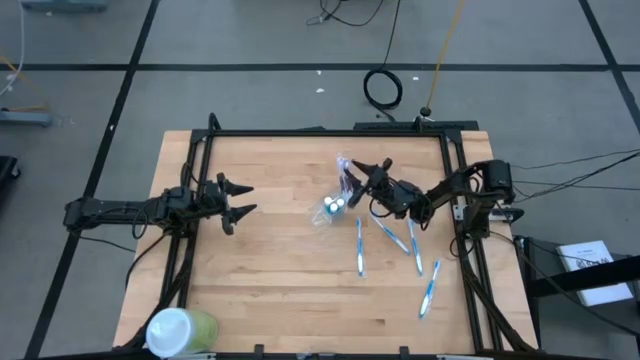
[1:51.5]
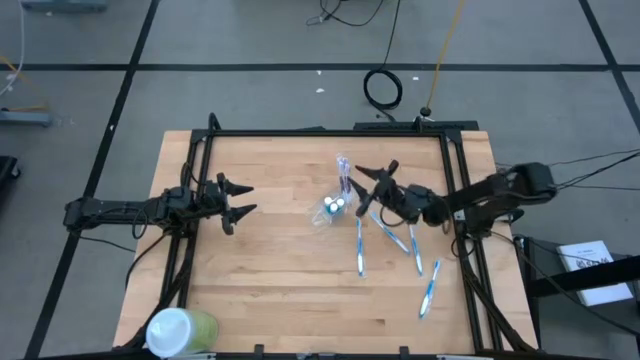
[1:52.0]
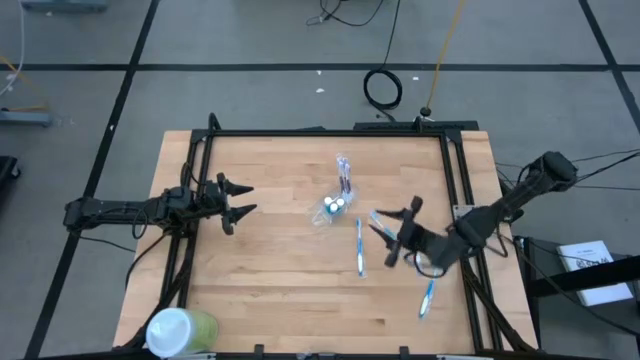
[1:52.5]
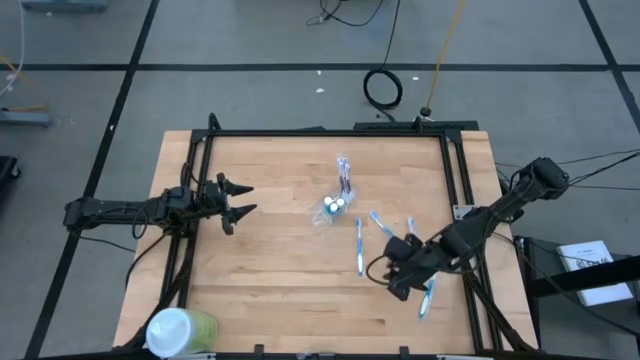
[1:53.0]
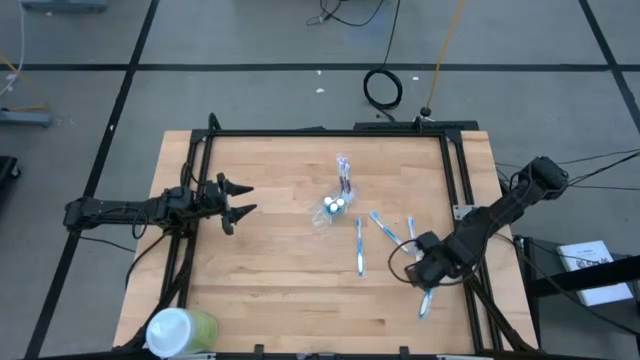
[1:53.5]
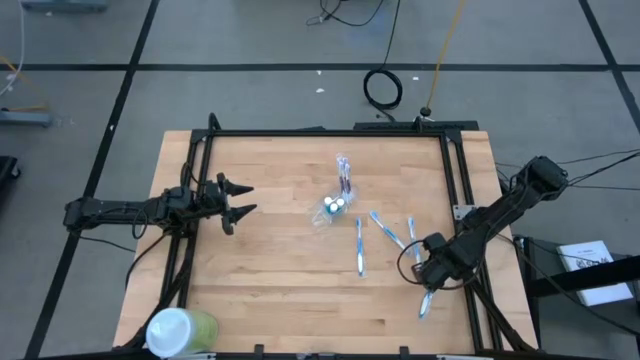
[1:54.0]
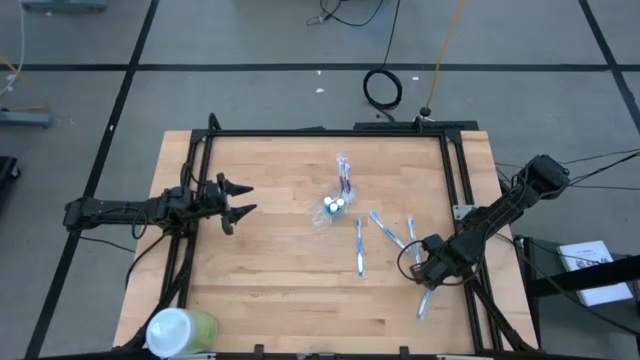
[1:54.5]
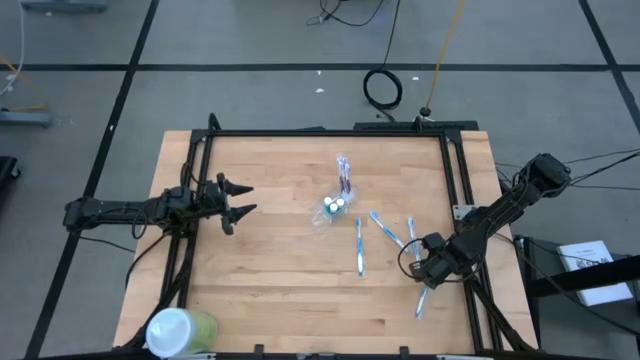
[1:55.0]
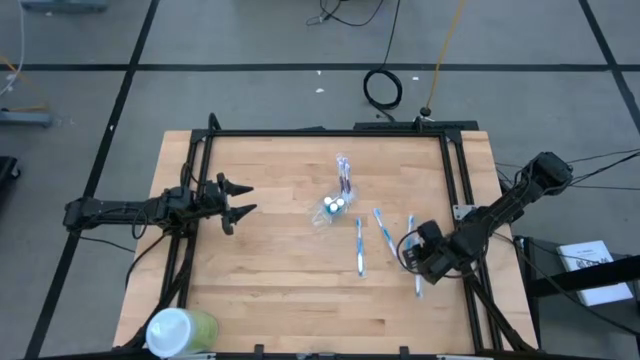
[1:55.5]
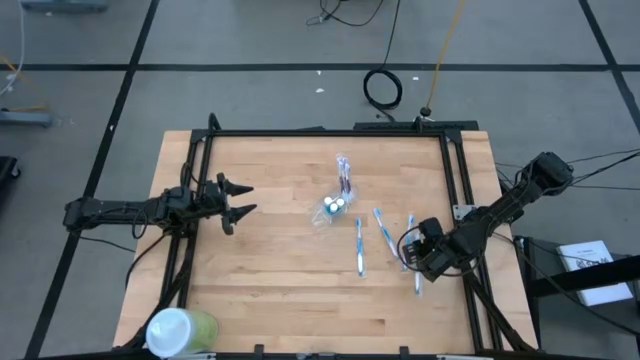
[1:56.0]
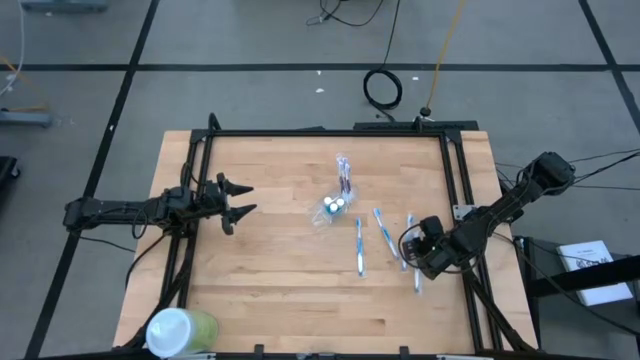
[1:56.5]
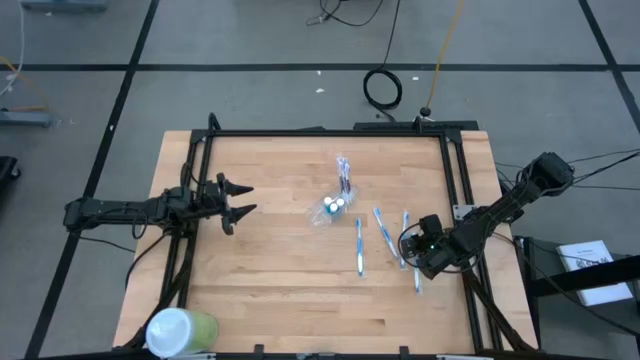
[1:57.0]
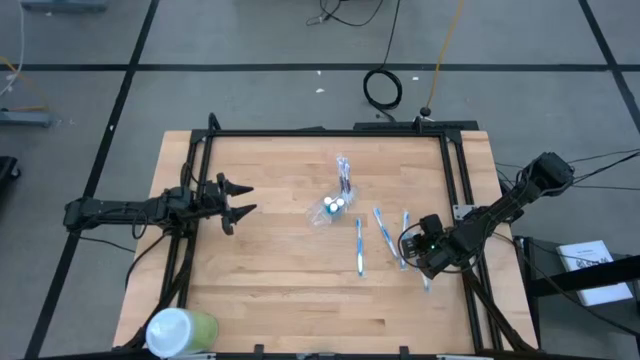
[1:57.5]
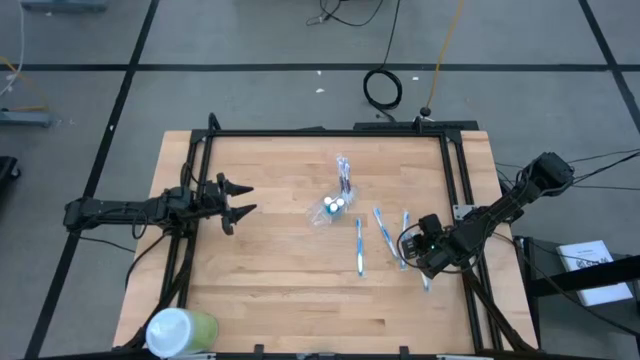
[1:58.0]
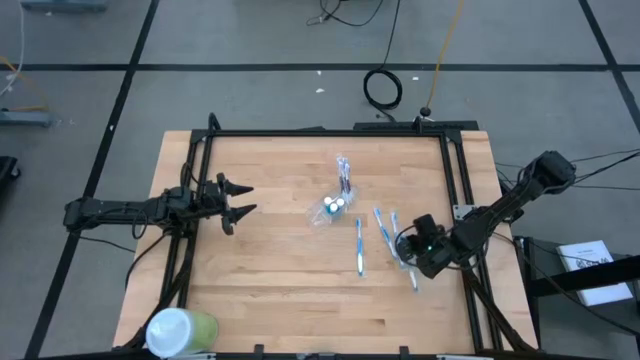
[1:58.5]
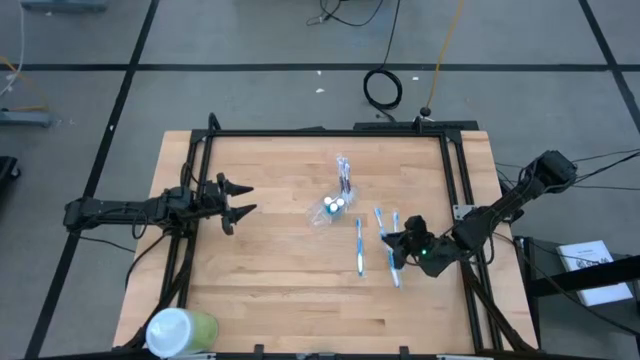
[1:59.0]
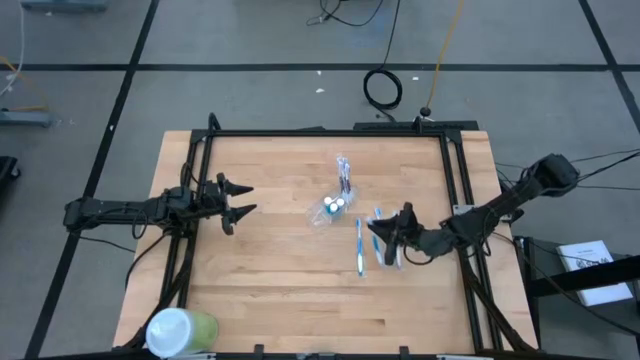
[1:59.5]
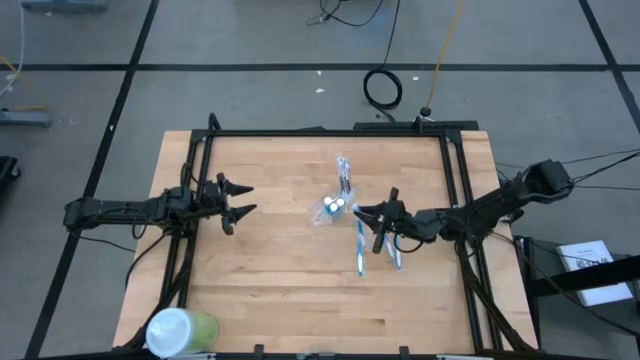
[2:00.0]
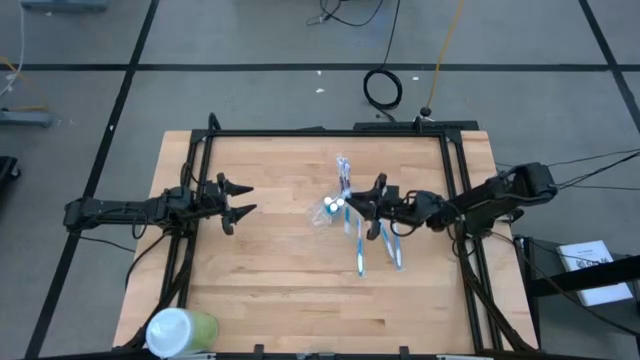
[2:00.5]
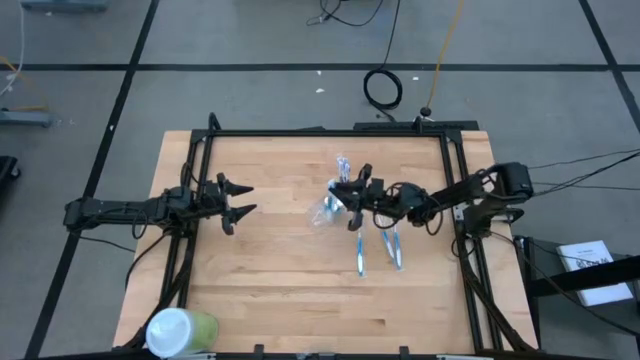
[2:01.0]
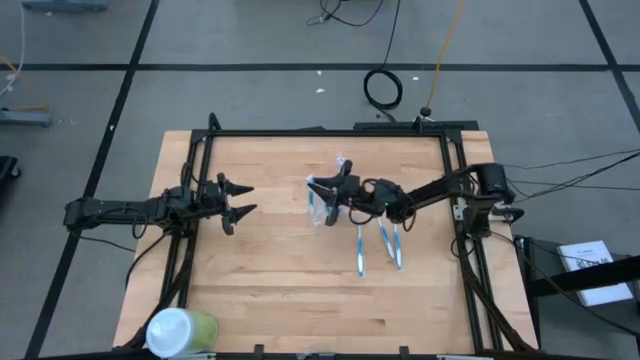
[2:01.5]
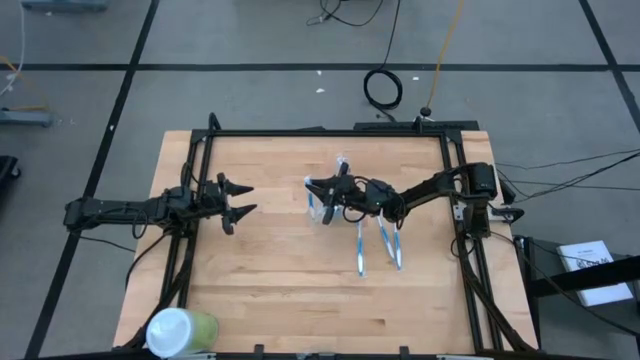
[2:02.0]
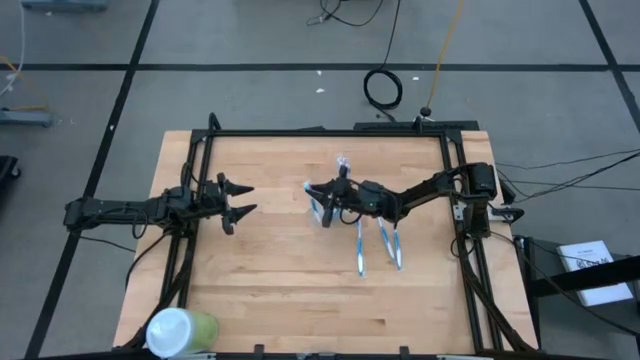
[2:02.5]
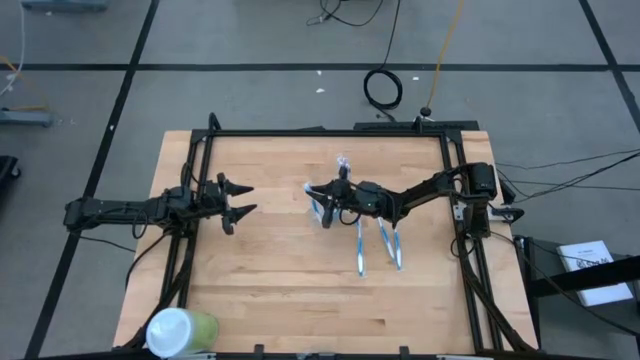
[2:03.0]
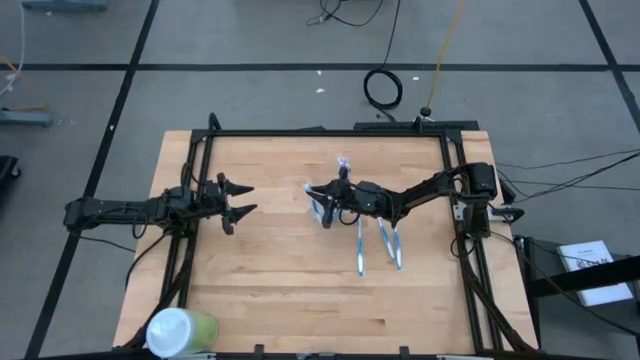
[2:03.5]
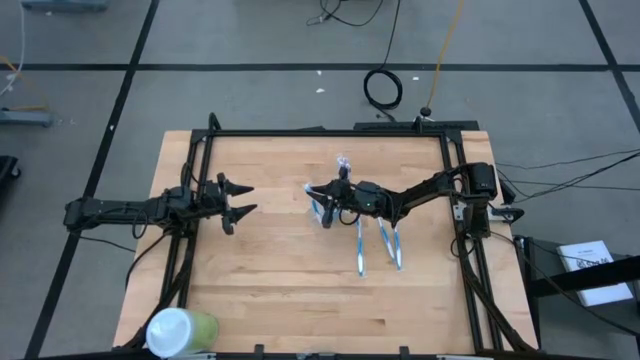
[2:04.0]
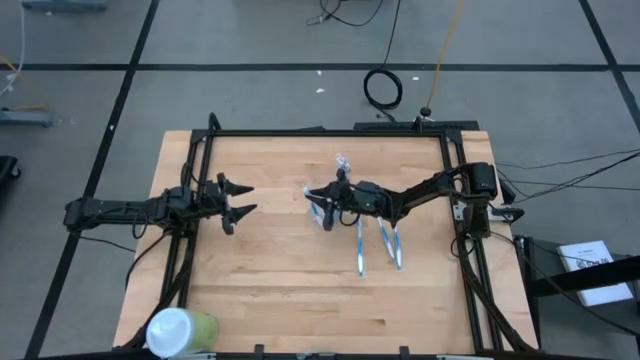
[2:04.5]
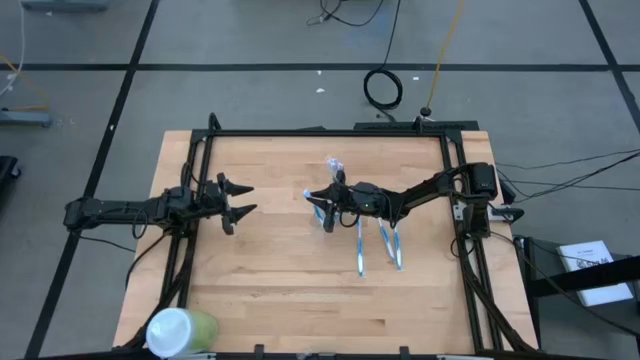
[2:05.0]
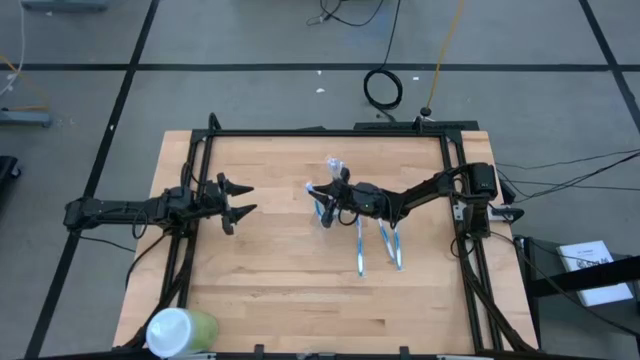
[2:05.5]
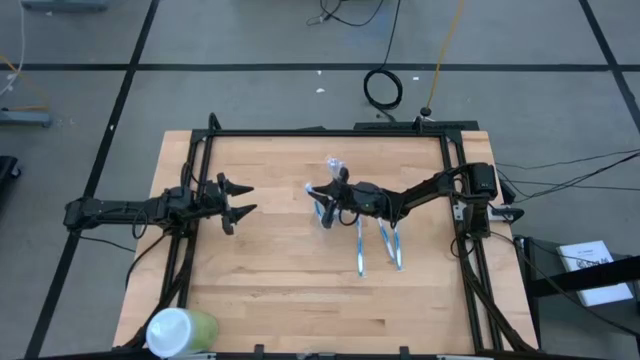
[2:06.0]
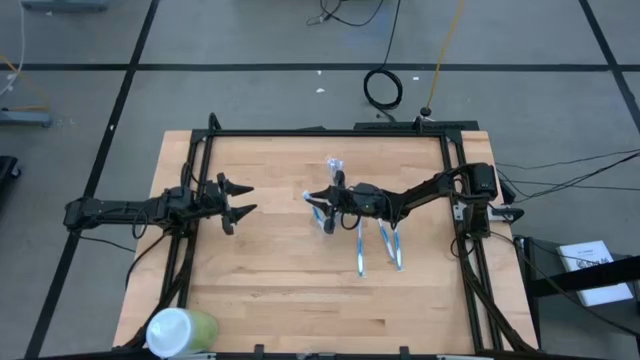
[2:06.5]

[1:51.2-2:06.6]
Task: Pick & Place toothbrushing station
Put the blue toothbrush into the transparent organizer

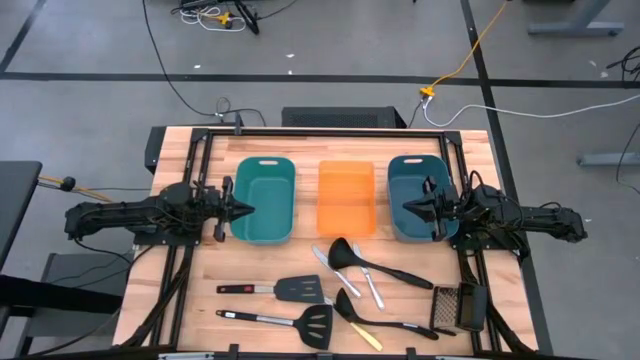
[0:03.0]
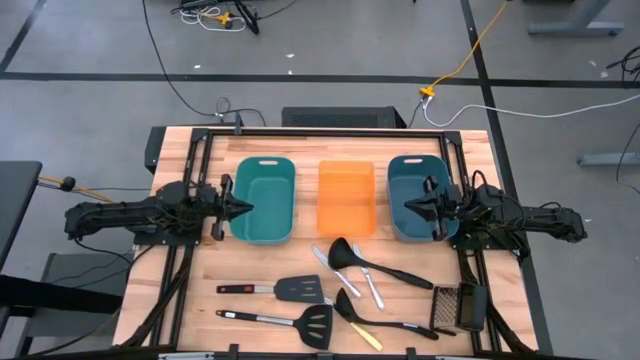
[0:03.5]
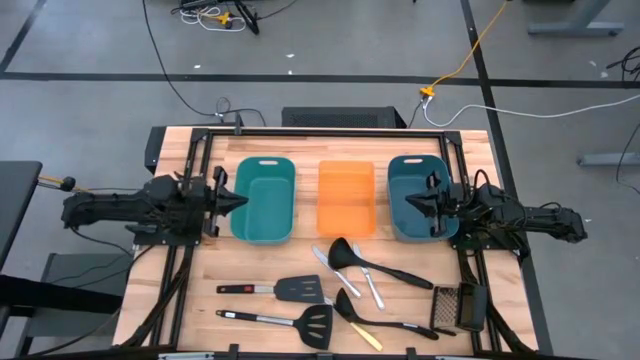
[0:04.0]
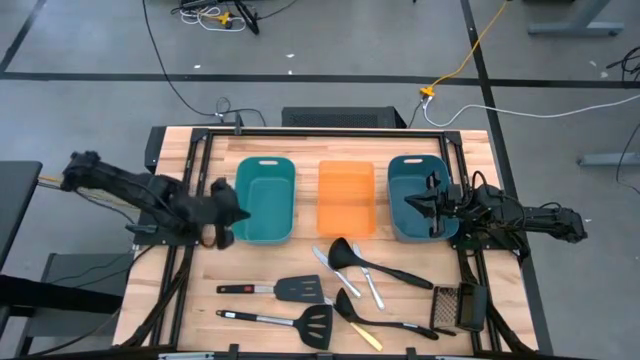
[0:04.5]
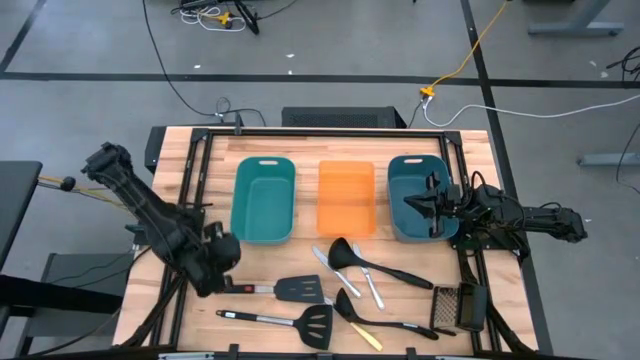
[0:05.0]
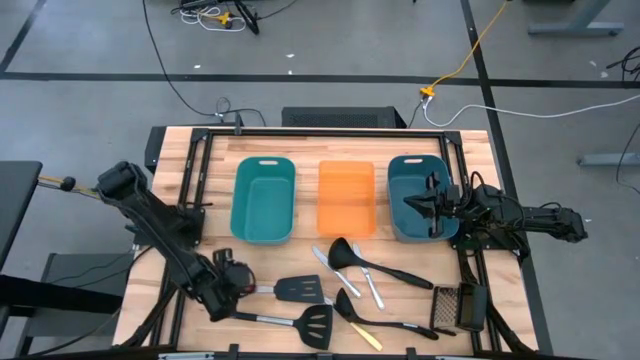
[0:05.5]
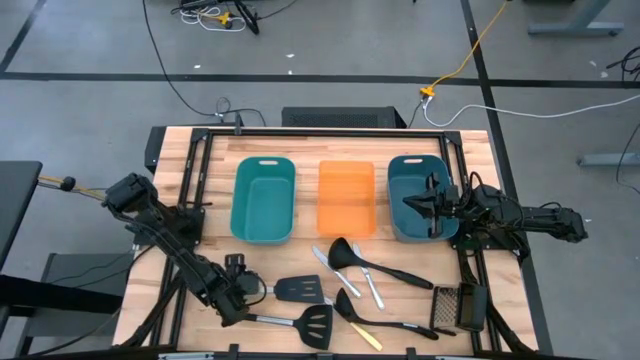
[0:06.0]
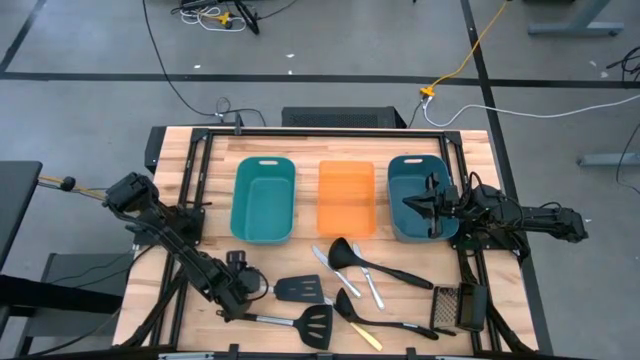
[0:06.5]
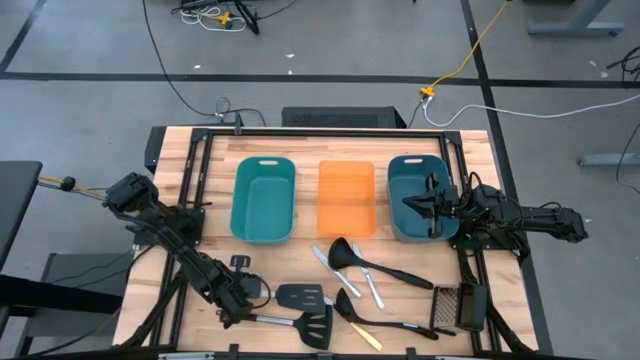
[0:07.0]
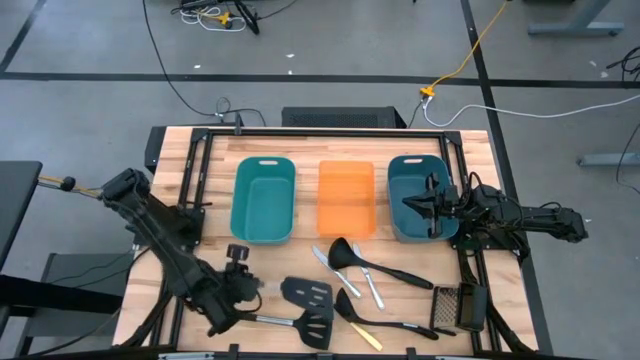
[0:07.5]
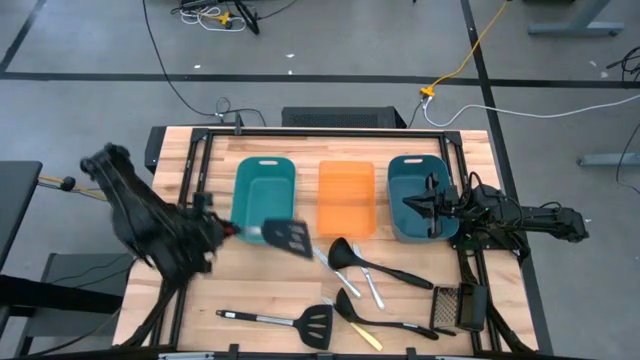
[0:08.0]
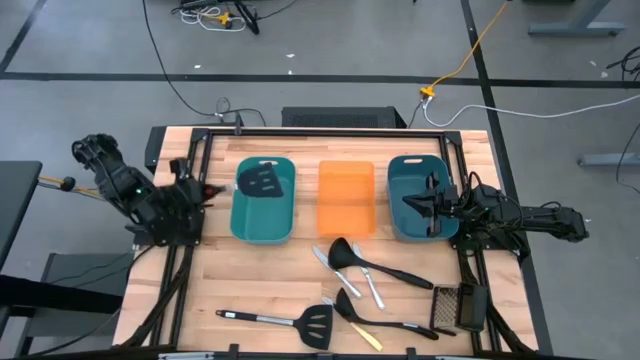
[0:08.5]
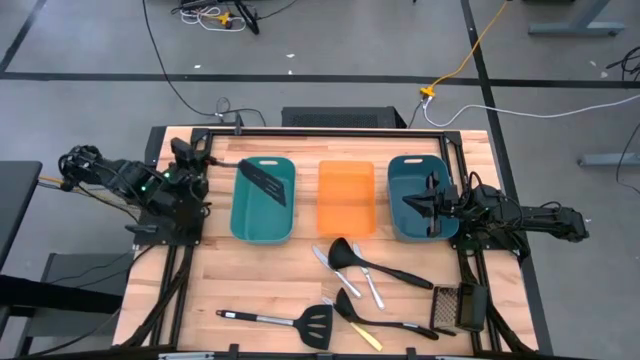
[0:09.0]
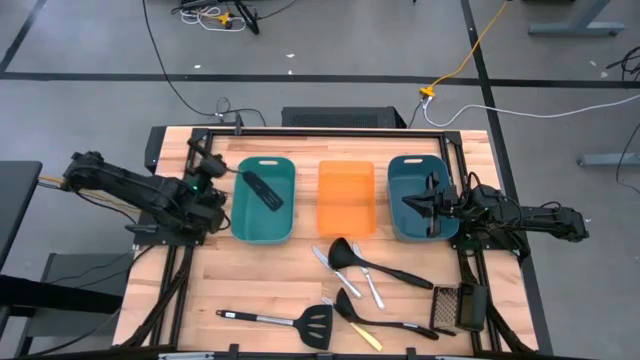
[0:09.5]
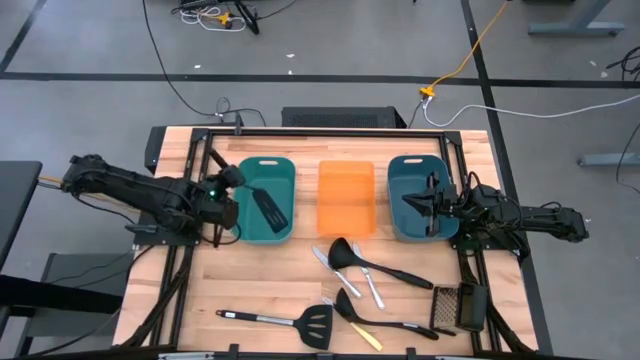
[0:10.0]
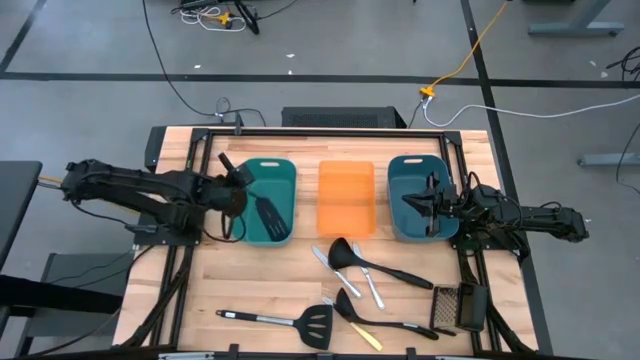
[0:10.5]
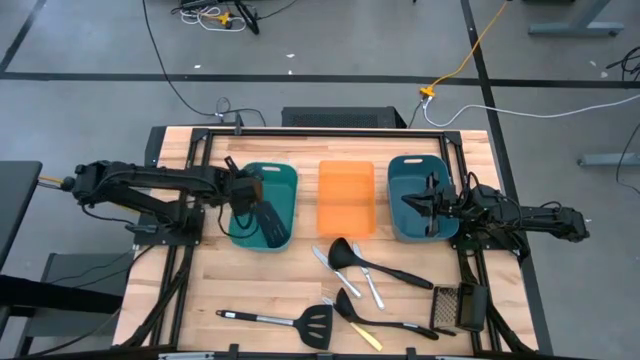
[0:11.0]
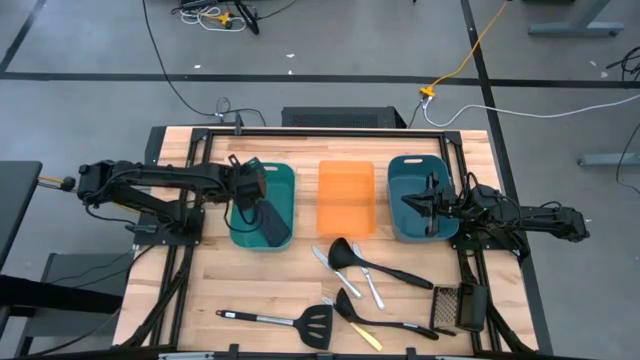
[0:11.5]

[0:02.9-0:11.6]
Task: Pick & Place Kitchen Items
Put the gray spatula into the green bin
